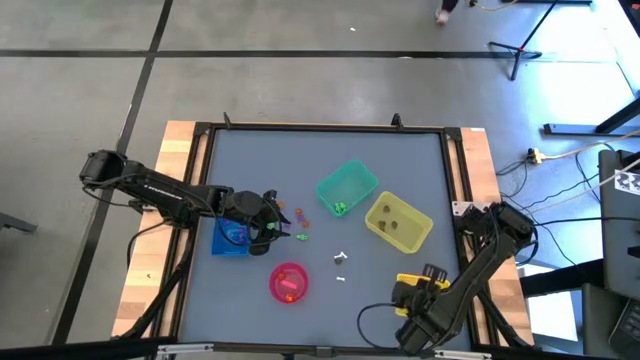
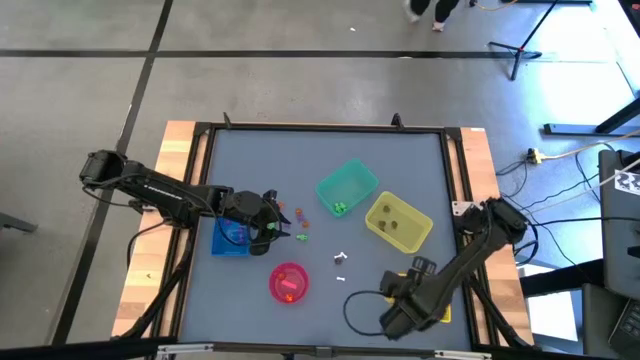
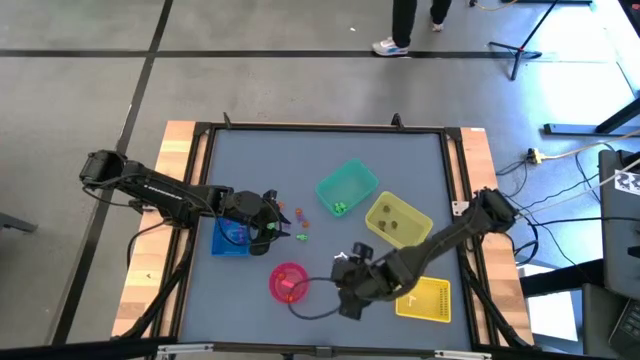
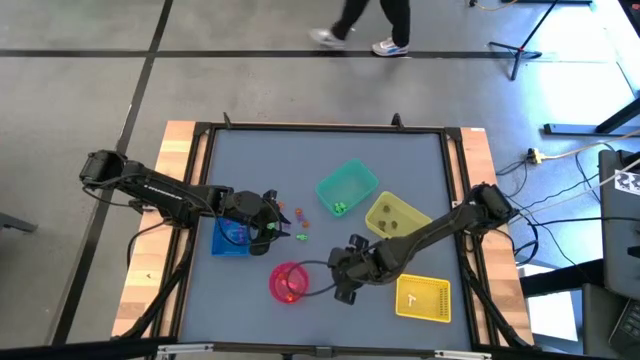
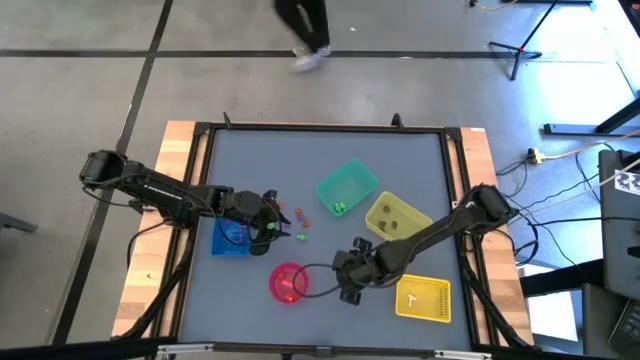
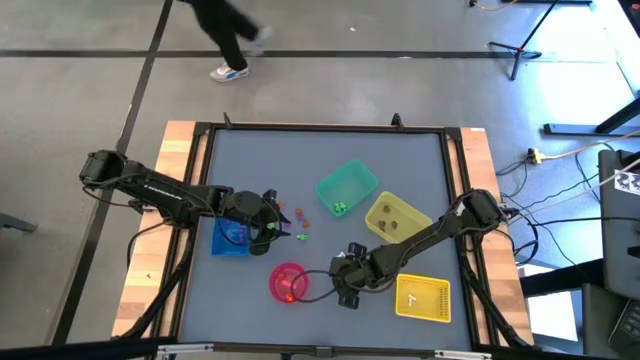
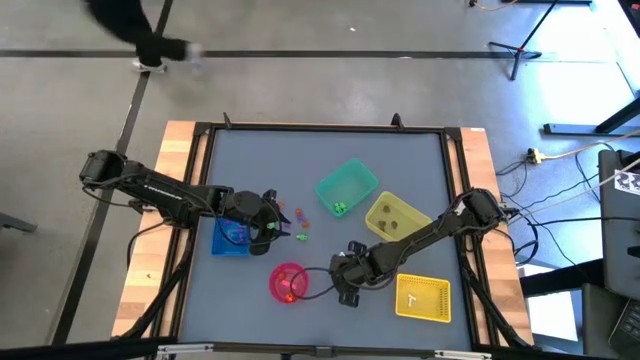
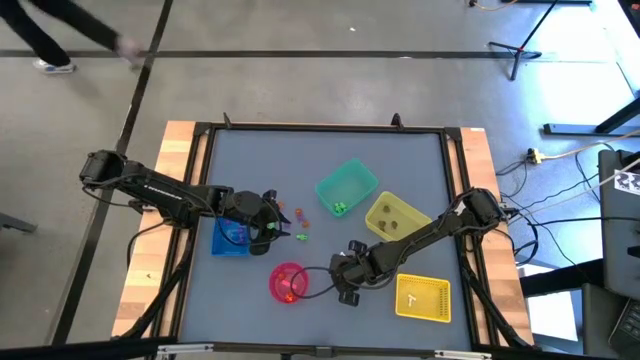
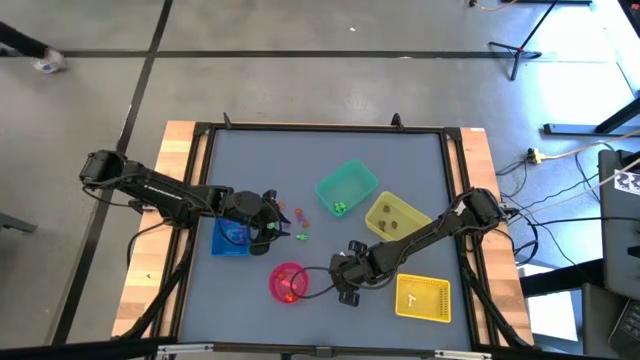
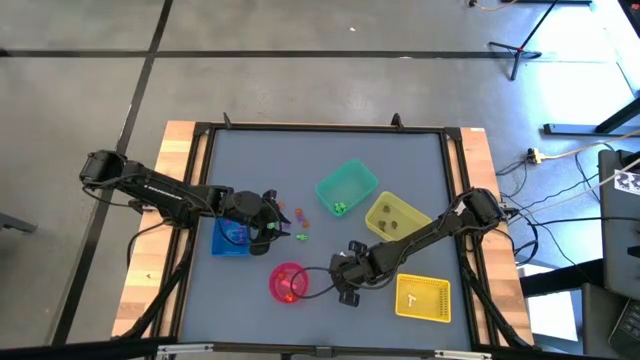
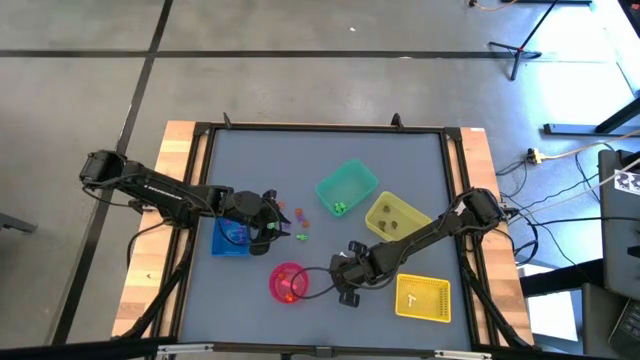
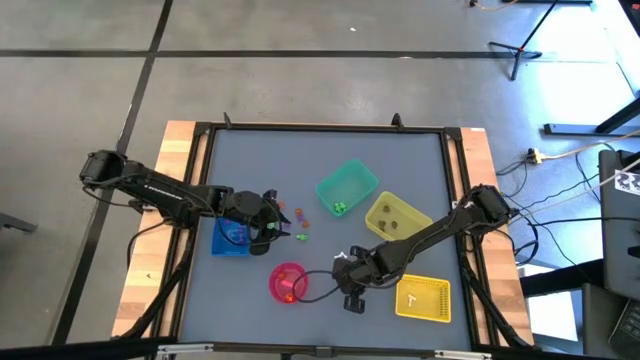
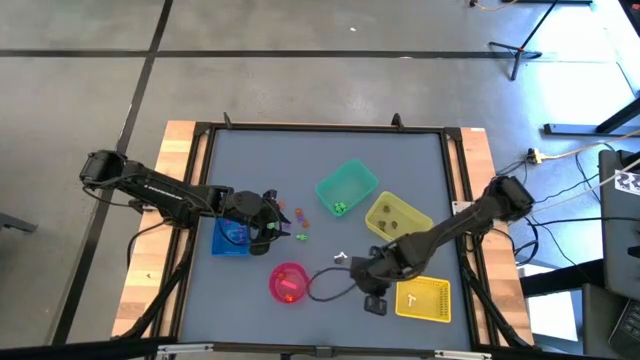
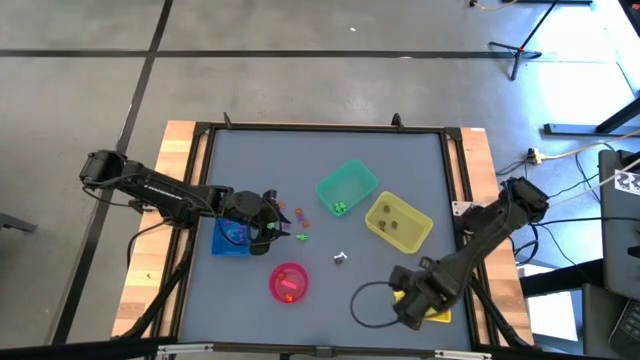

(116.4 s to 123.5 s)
Task: Sort Halloween decoration
Put the white bone toy into the yellow bin

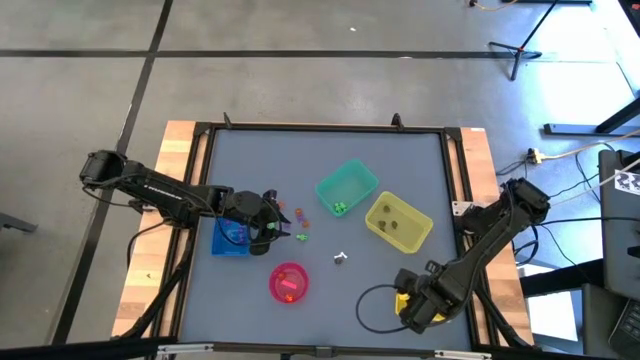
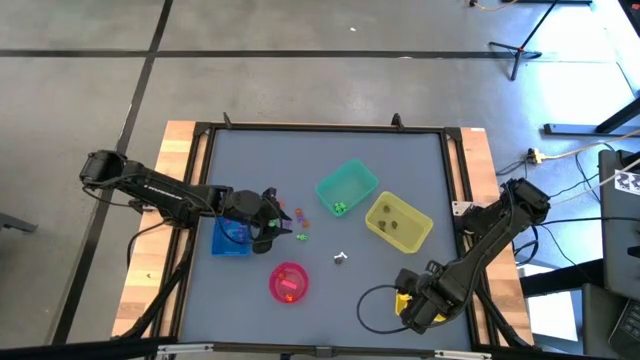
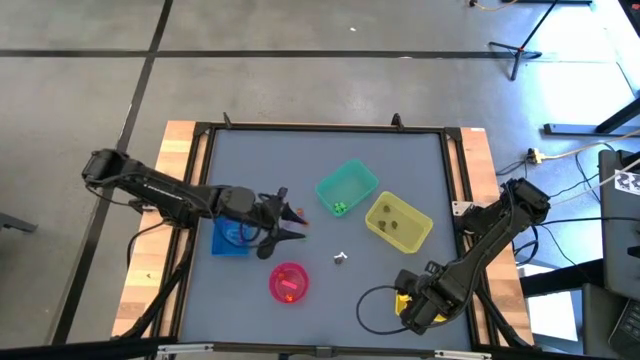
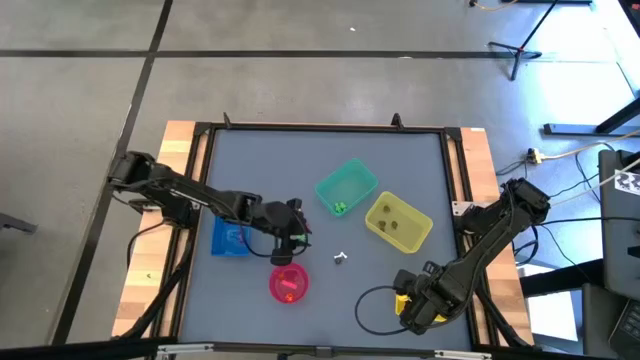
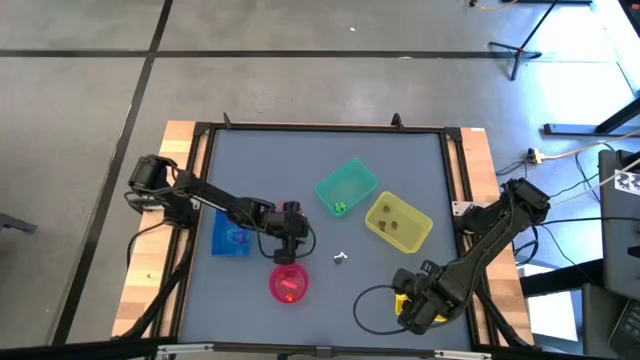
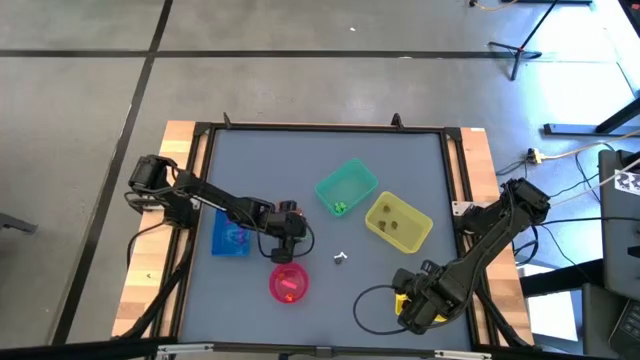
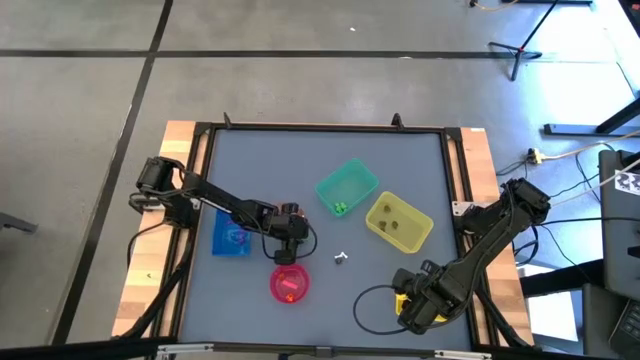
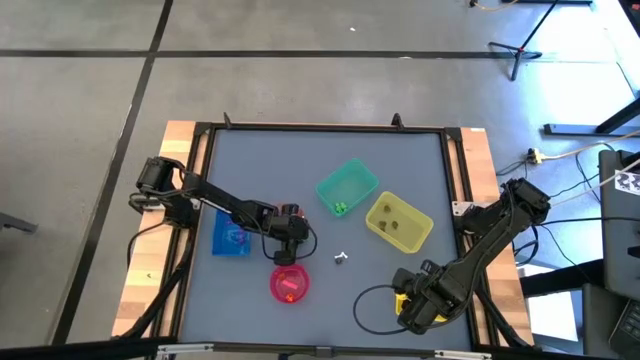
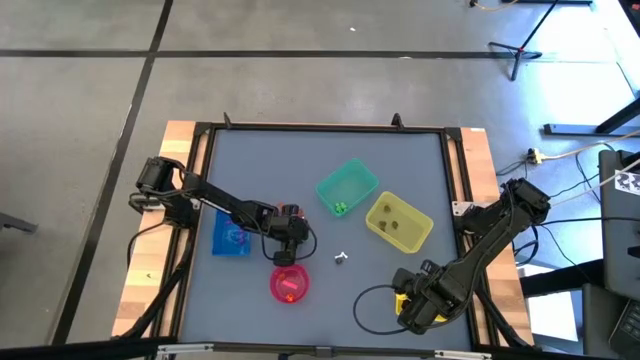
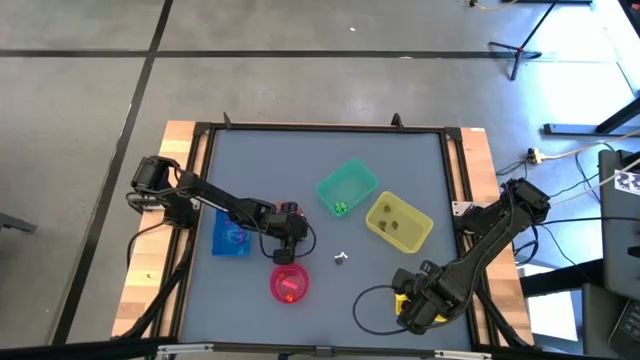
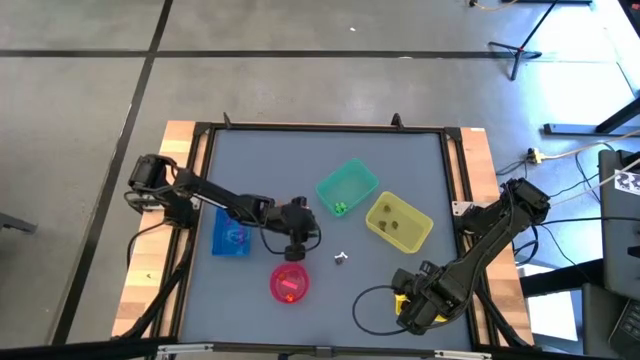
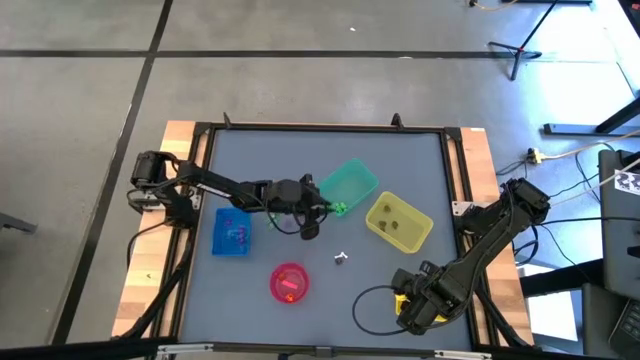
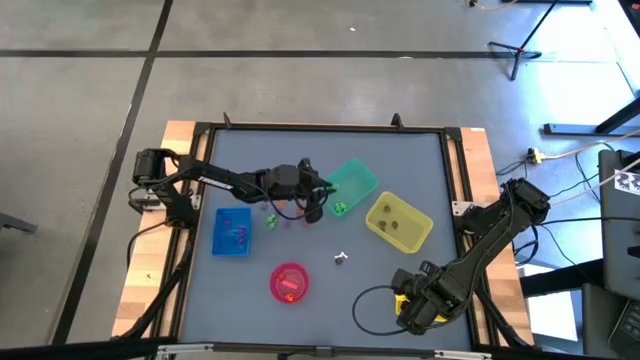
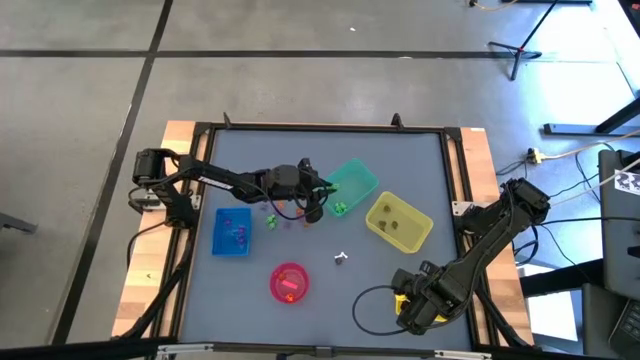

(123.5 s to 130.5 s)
Put the green skeleton toy into the green bin

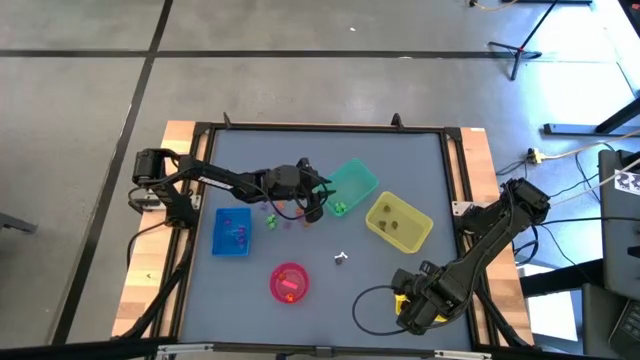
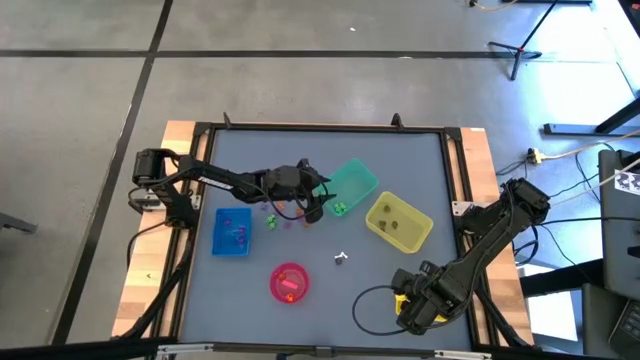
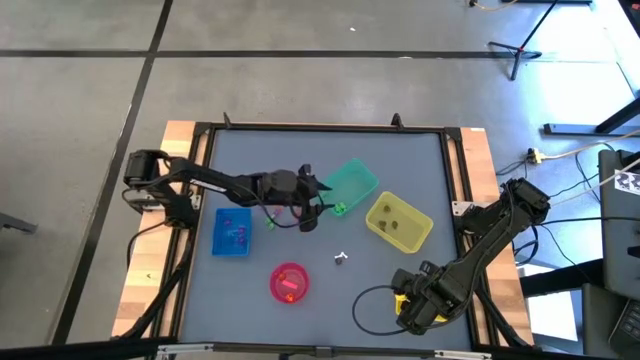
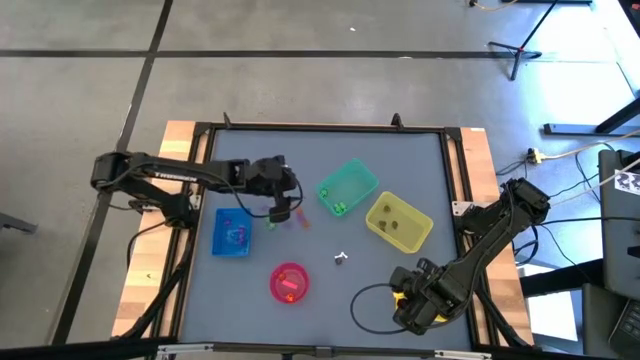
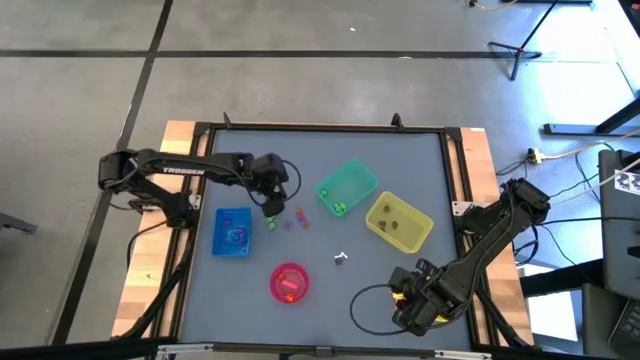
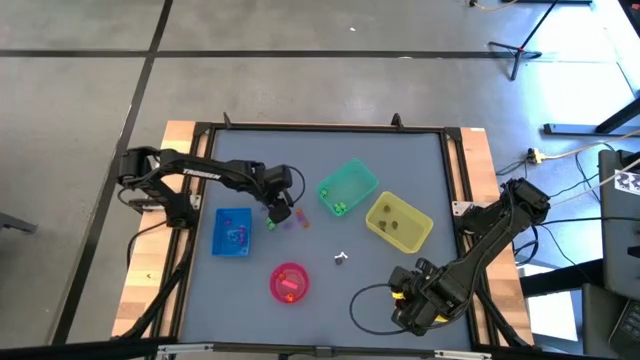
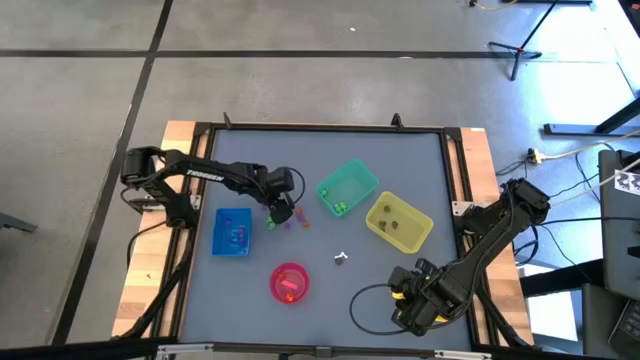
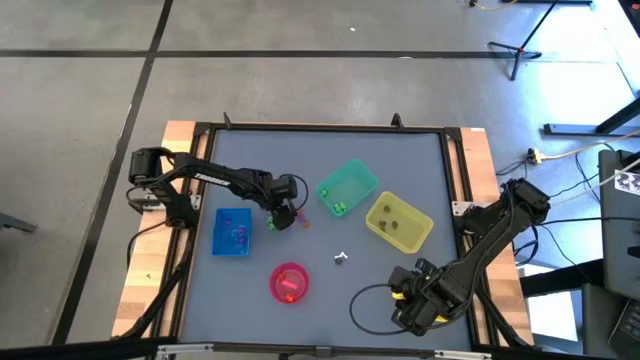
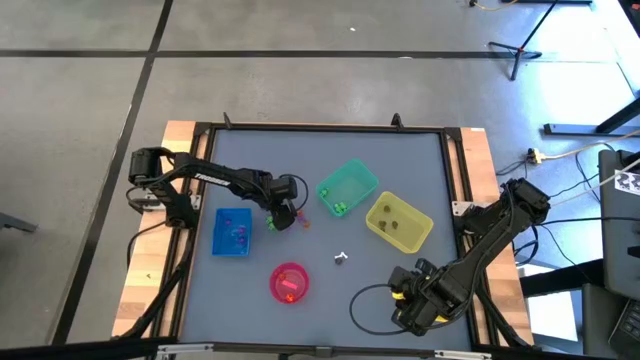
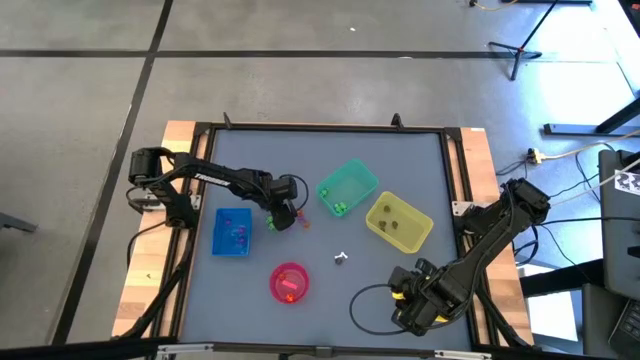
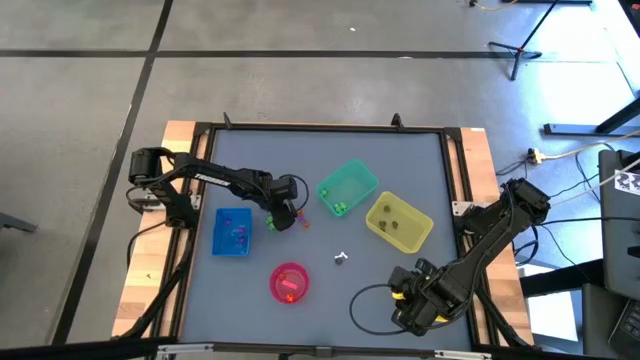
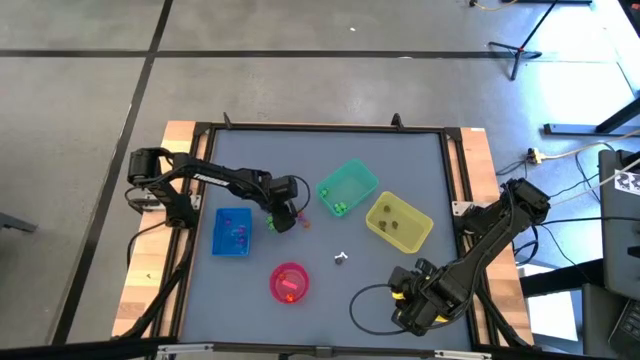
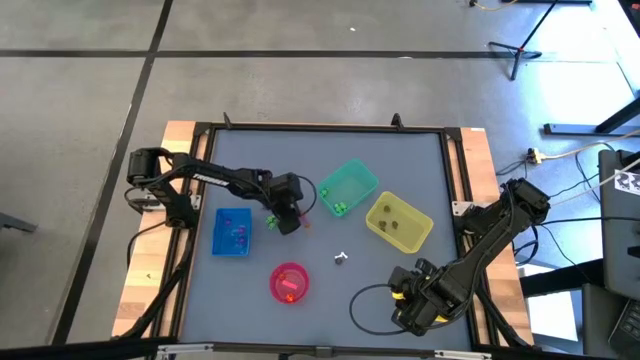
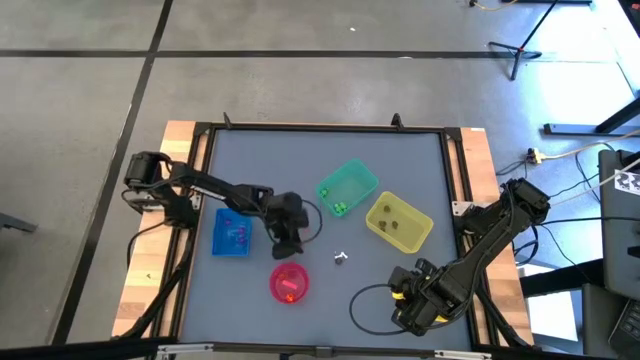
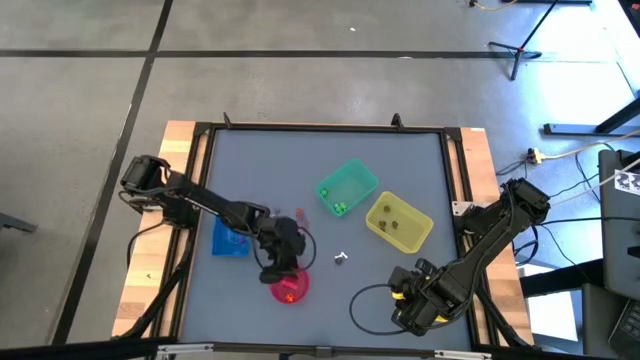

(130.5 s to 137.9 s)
Put the orange pumpkin toy into the pink bowl
